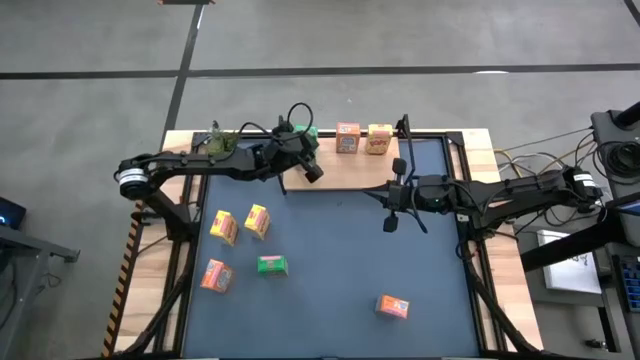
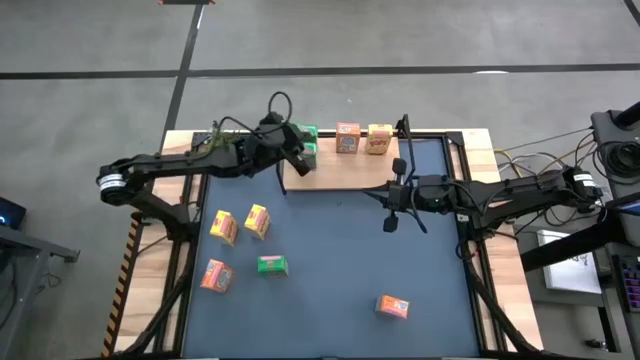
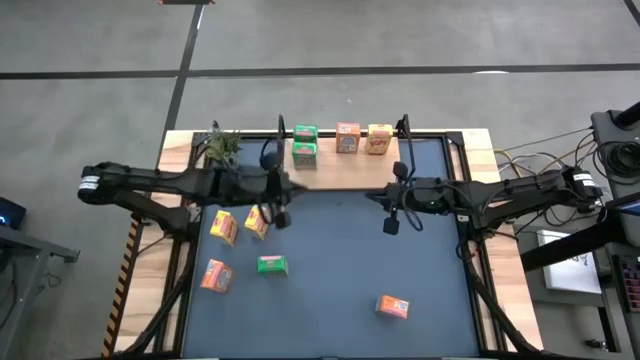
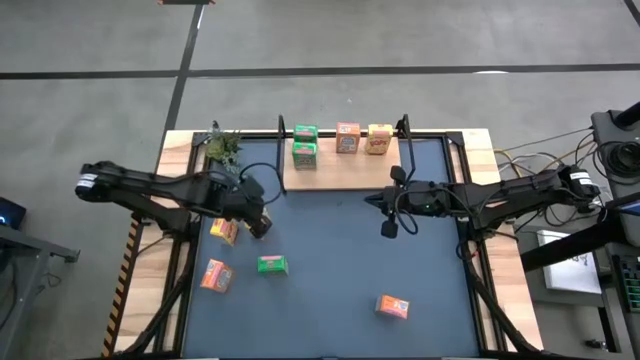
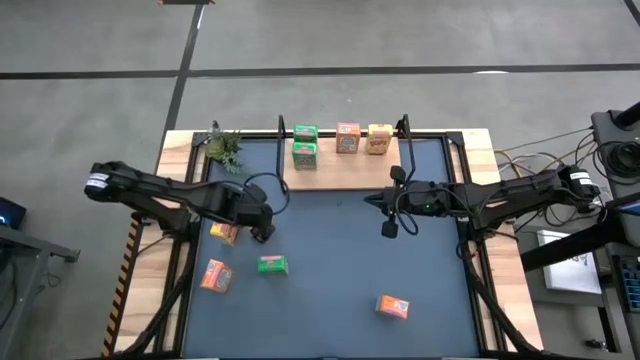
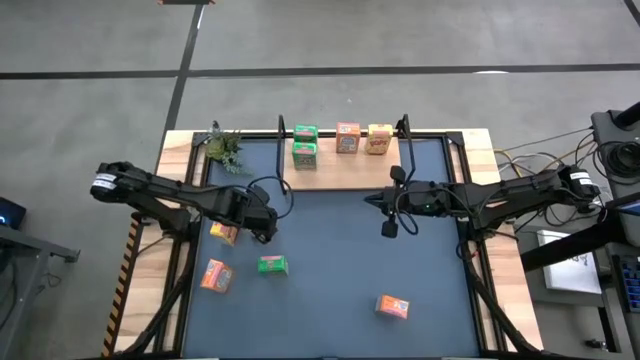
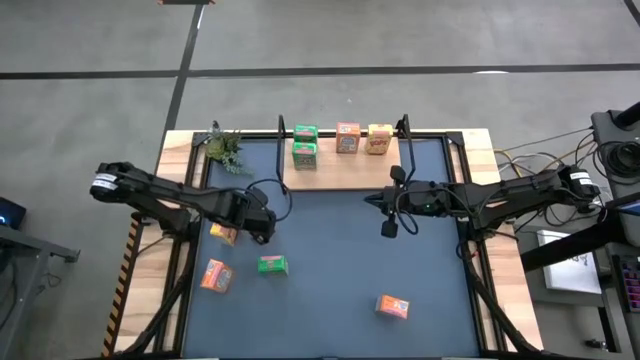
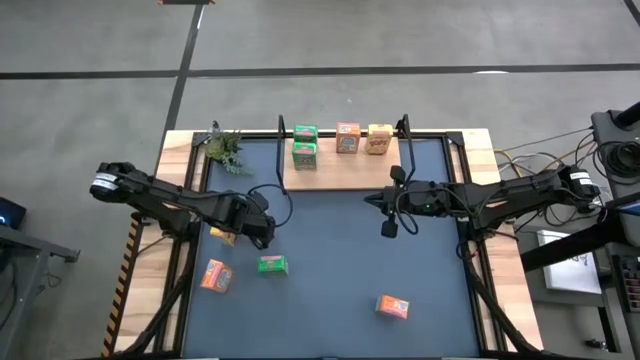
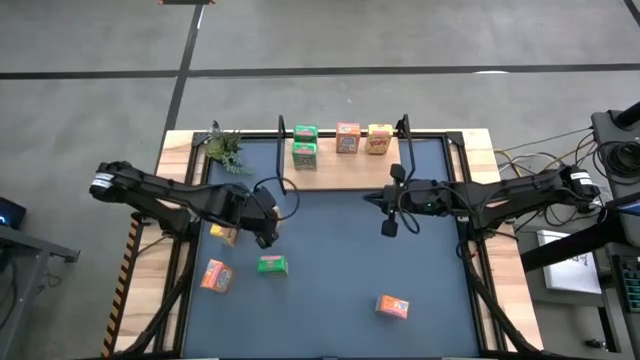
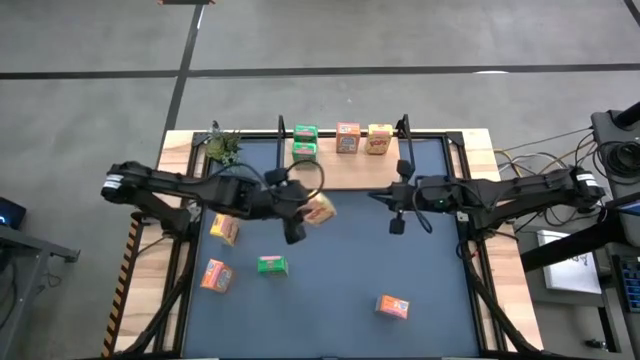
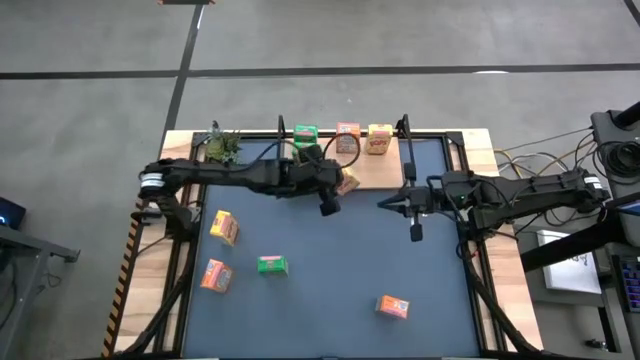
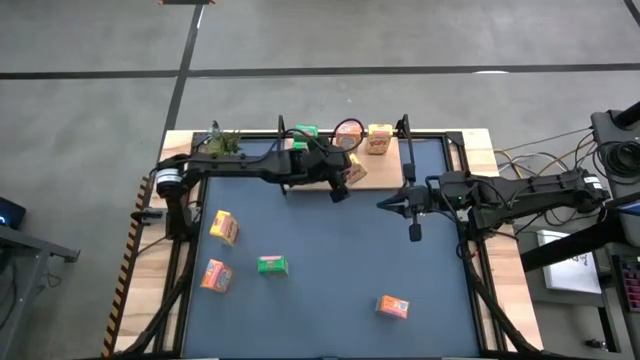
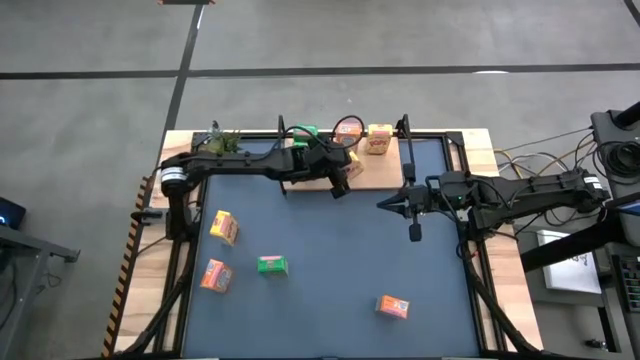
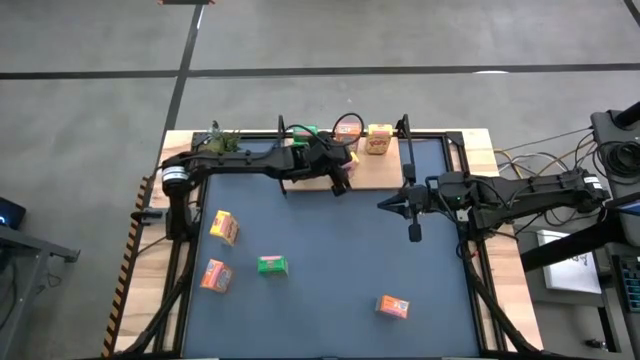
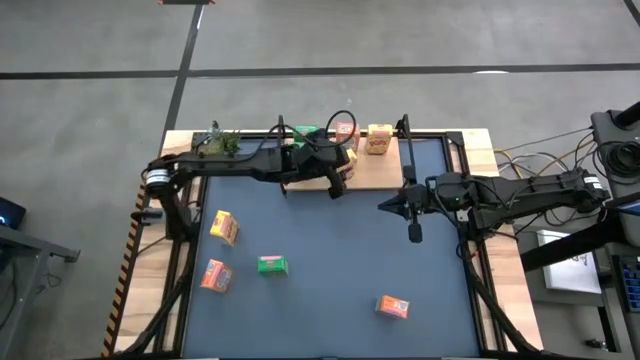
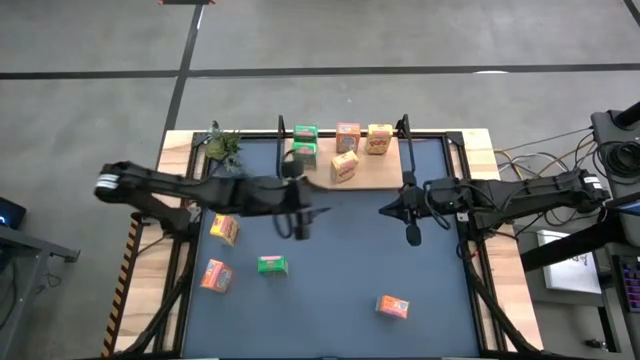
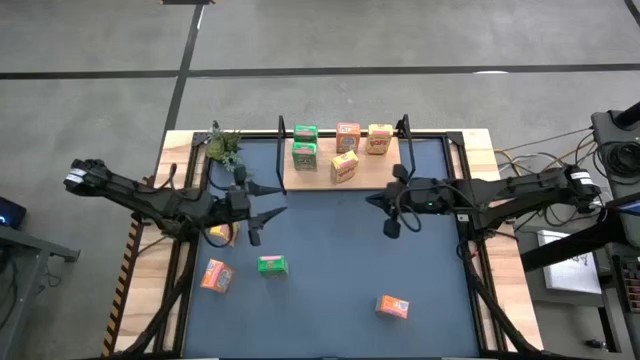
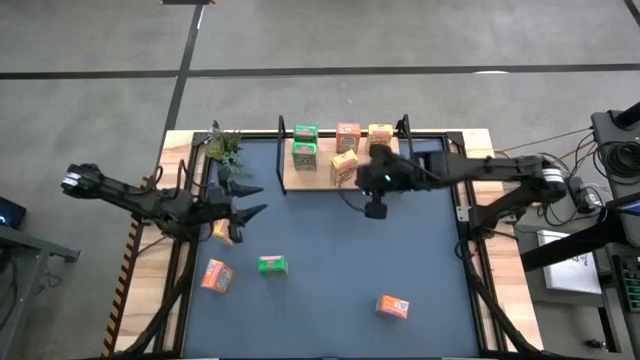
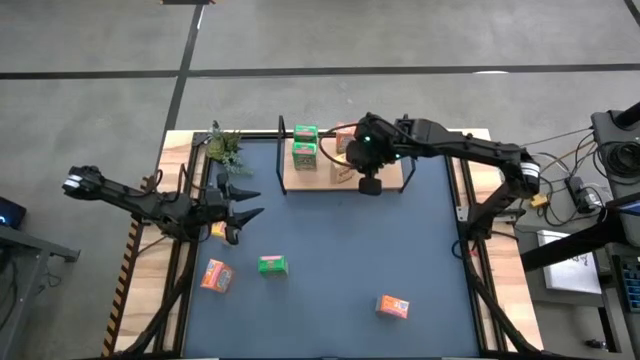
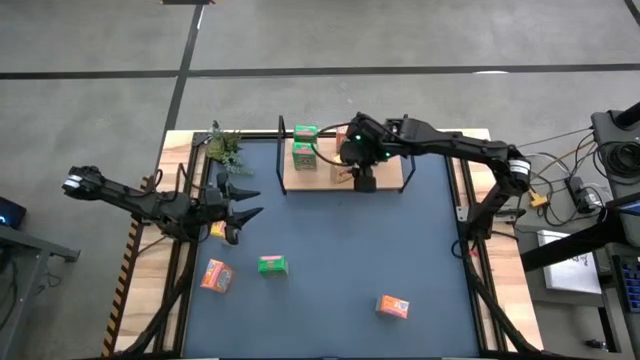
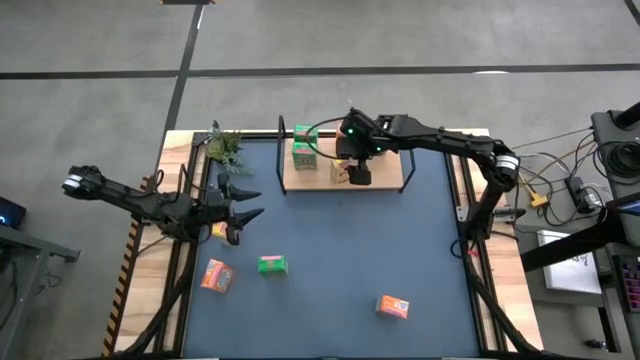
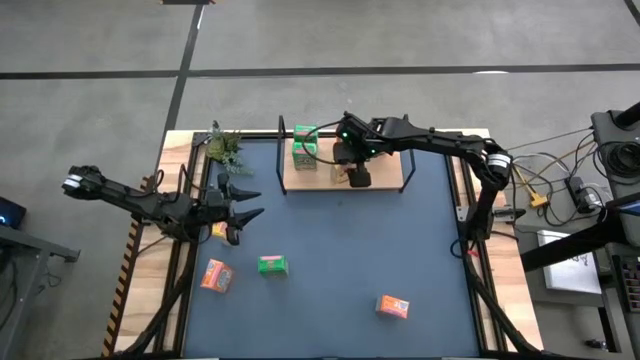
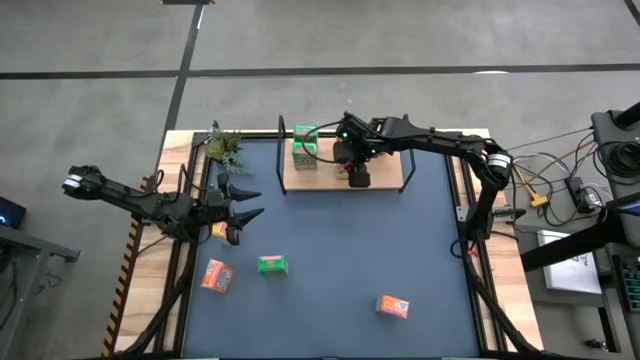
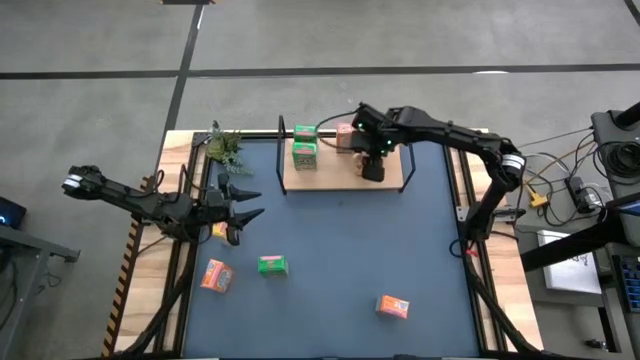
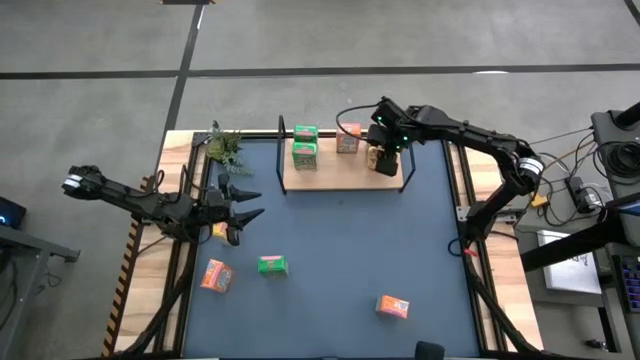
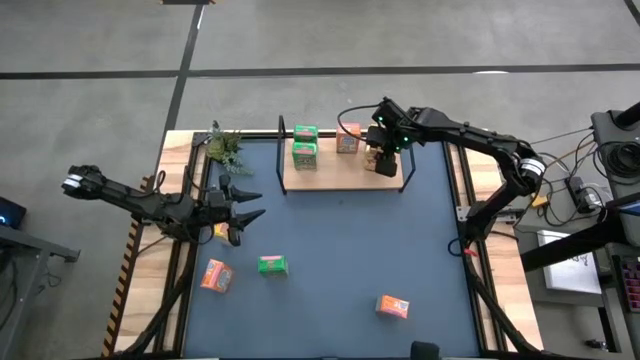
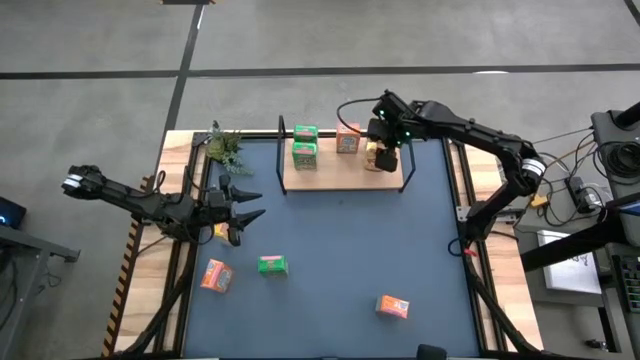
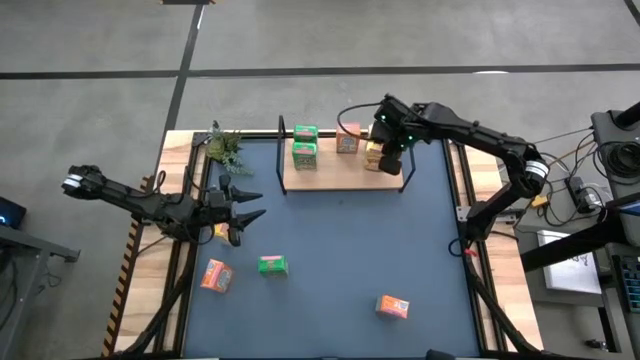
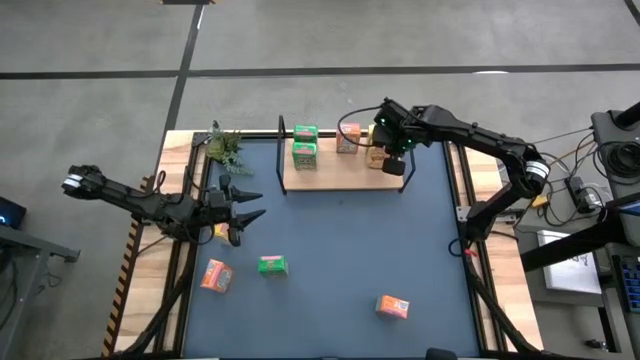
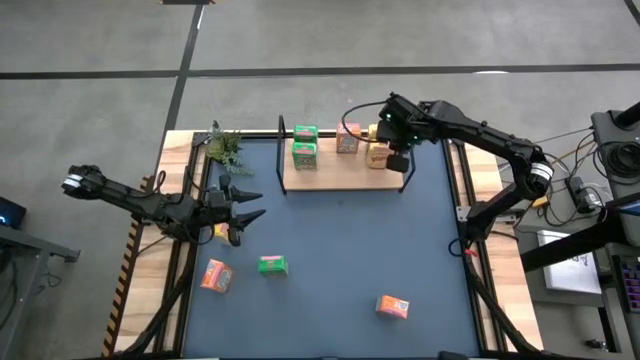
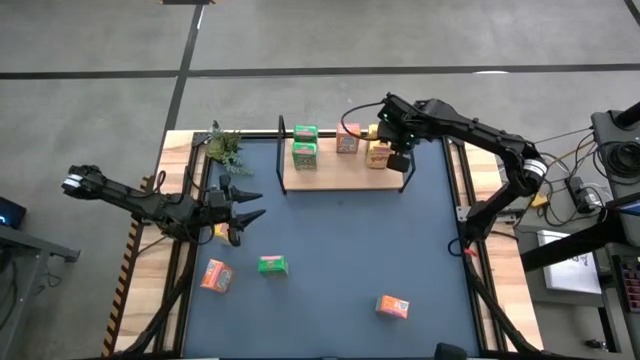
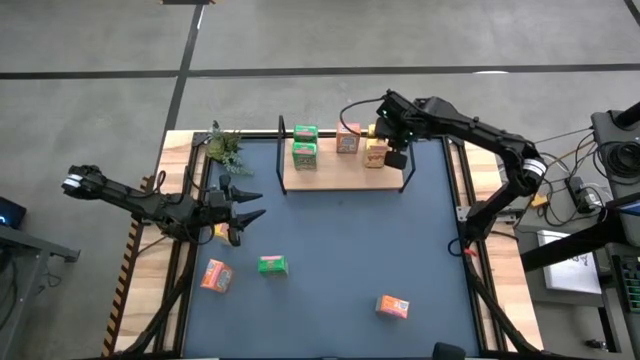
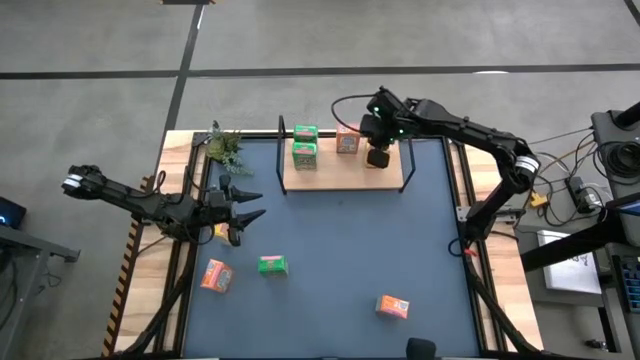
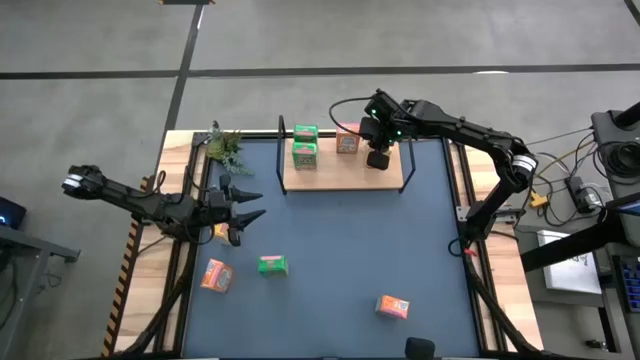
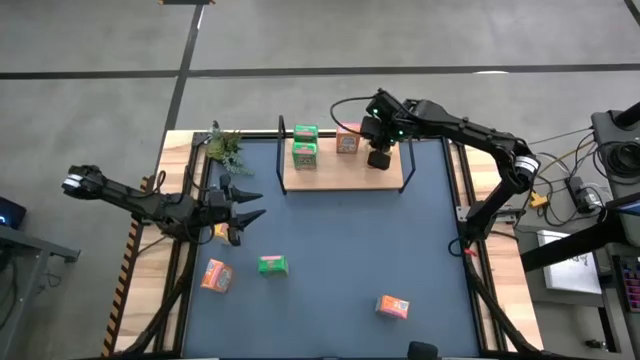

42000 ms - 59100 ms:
Task: Stack cereal on shelf
Stack the bottom yellow cereal box on the shelf

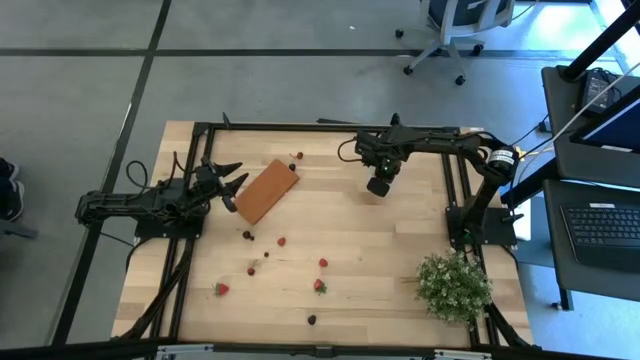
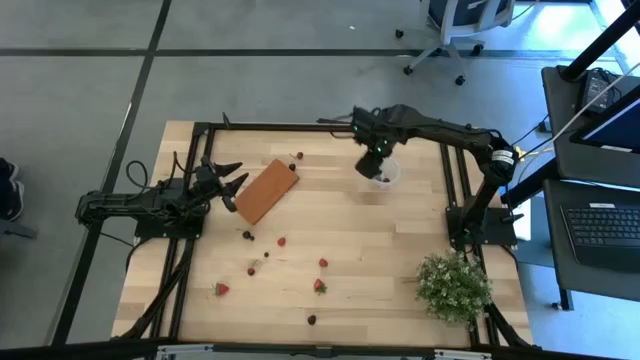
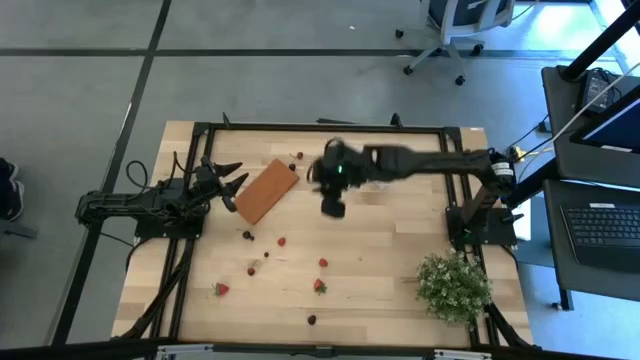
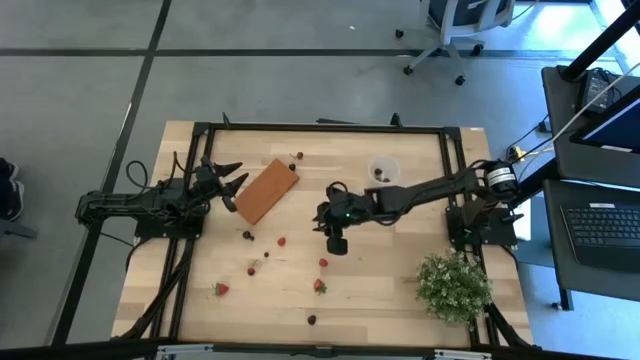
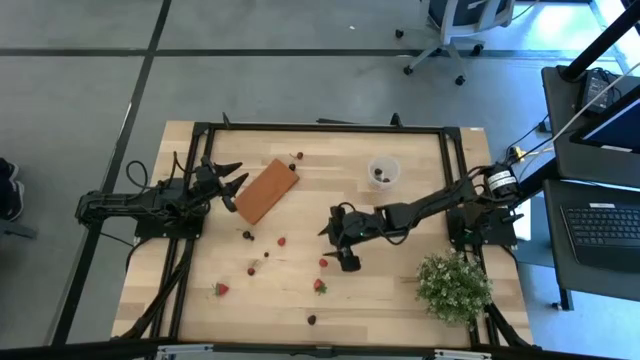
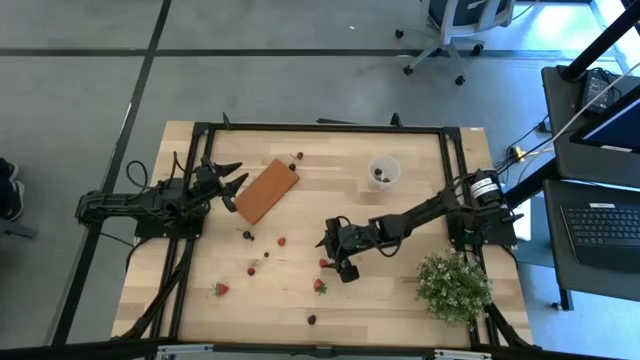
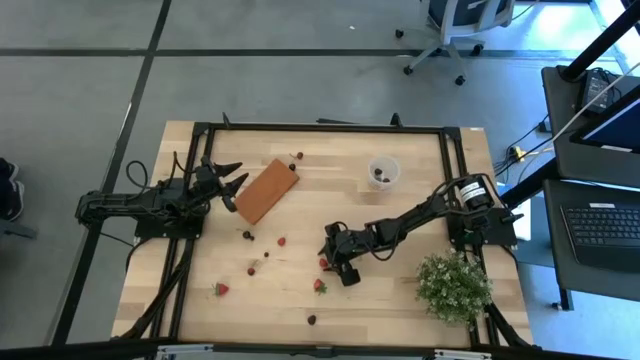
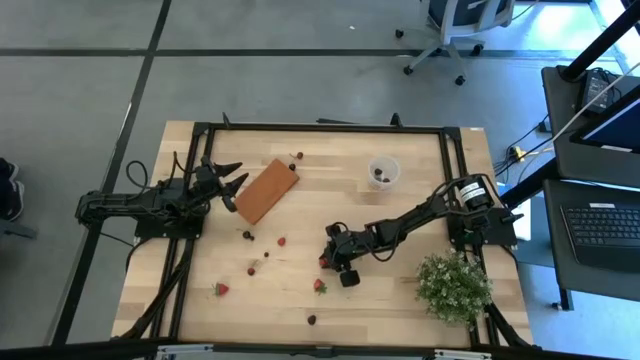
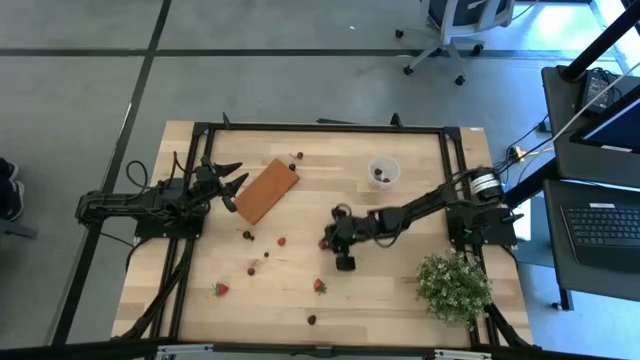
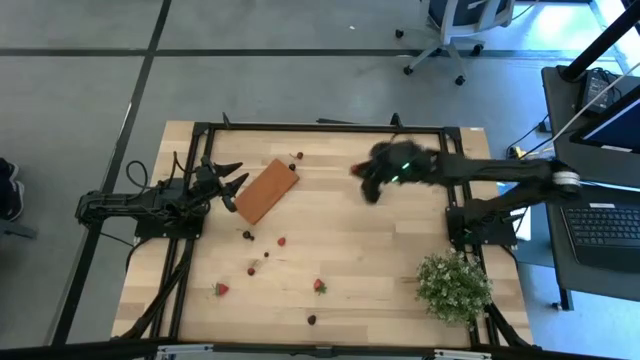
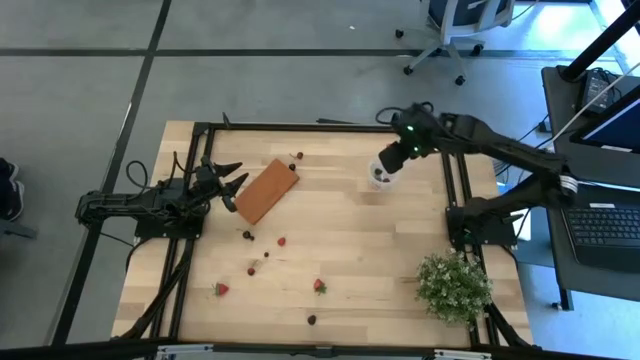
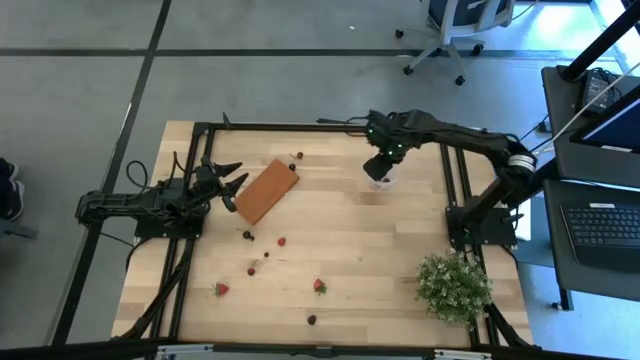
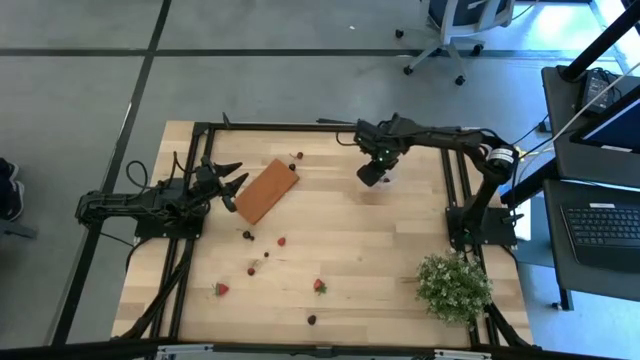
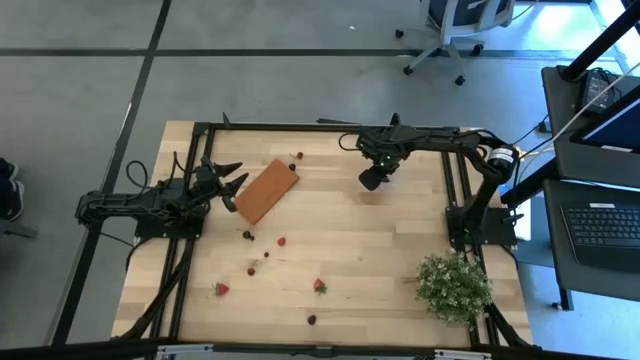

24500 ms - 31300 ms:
Task: Pick and placing Produce into tupperware
Put the bottom red raspberry into the transparent container
